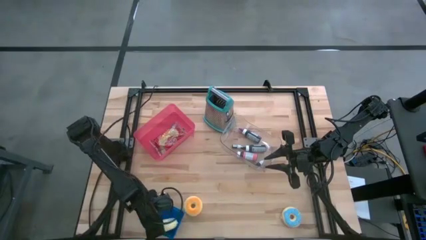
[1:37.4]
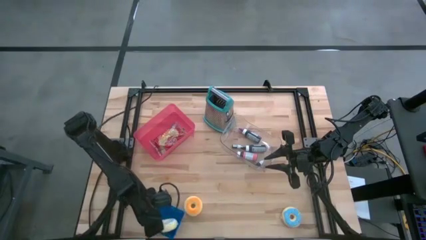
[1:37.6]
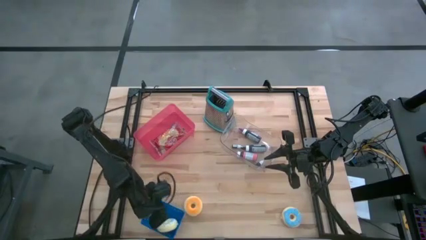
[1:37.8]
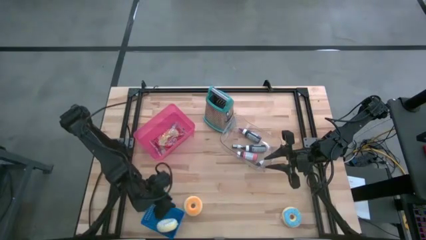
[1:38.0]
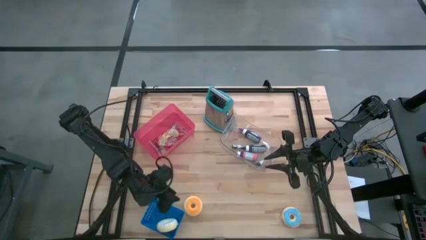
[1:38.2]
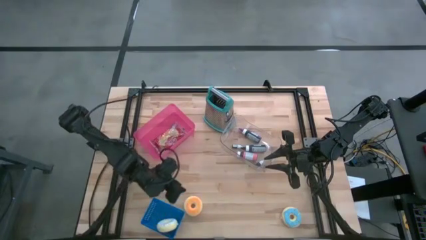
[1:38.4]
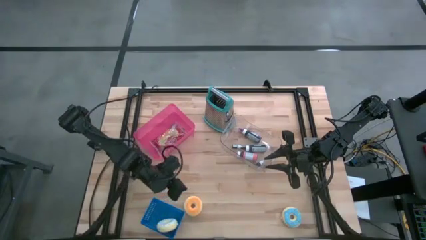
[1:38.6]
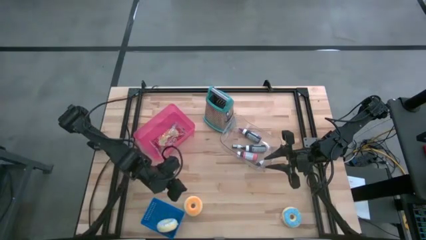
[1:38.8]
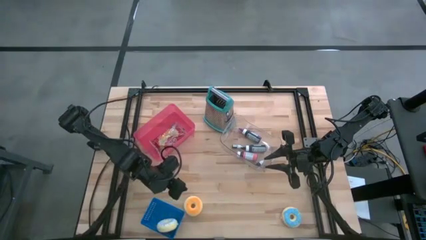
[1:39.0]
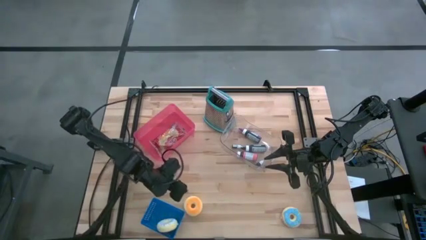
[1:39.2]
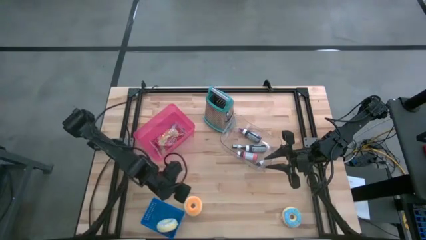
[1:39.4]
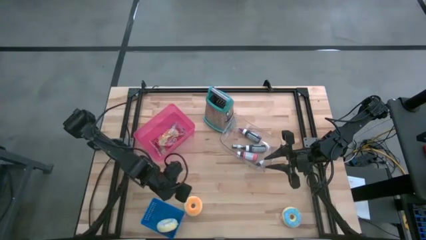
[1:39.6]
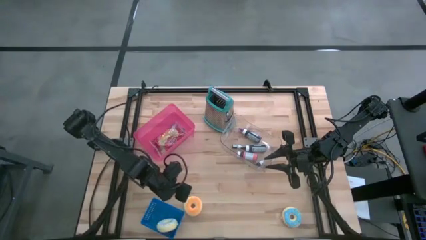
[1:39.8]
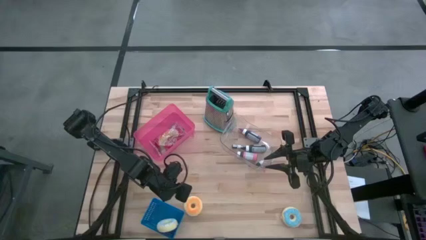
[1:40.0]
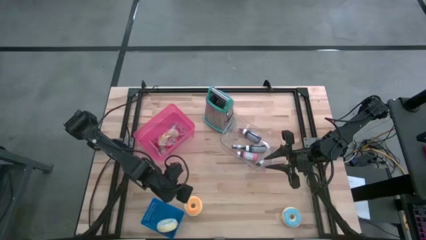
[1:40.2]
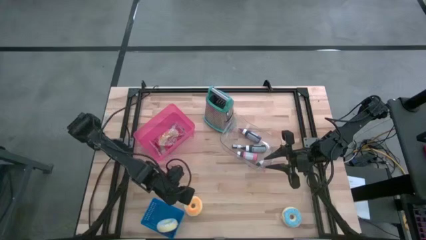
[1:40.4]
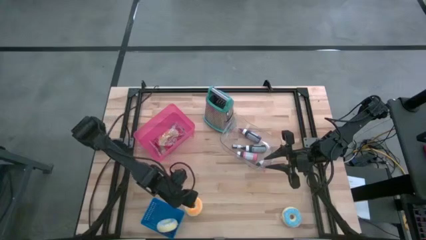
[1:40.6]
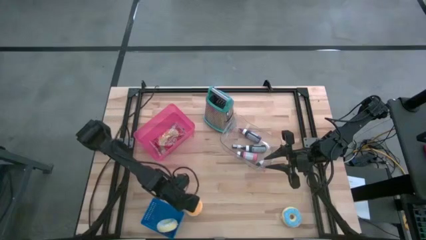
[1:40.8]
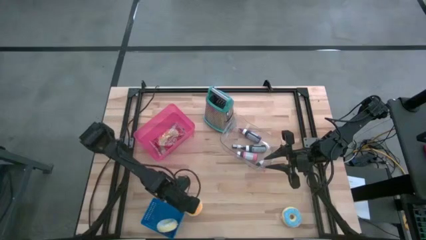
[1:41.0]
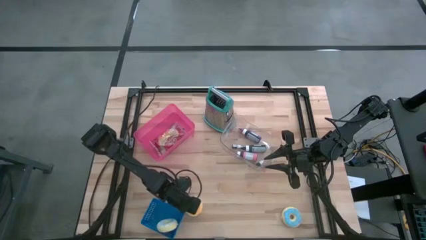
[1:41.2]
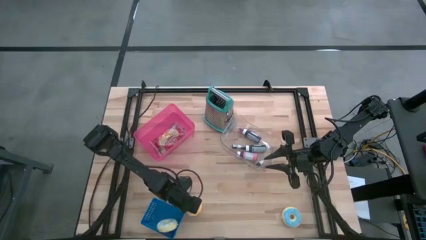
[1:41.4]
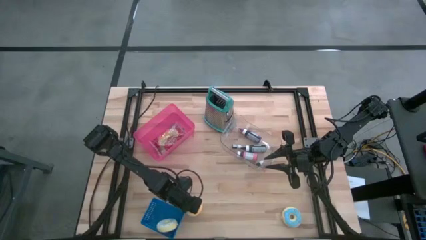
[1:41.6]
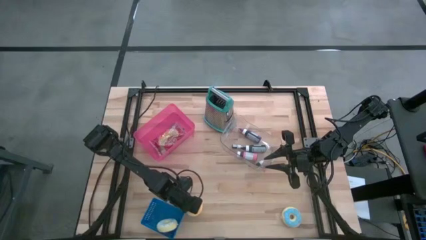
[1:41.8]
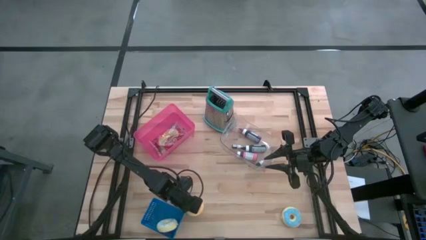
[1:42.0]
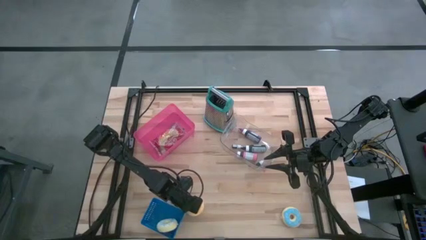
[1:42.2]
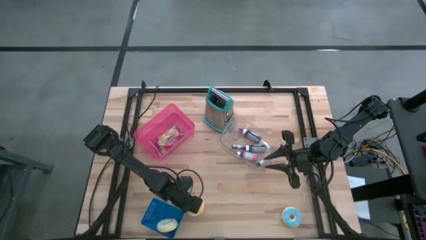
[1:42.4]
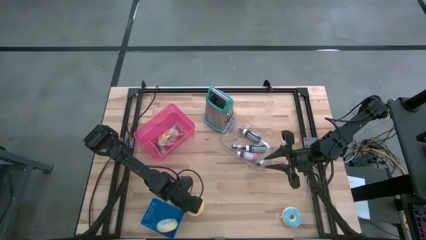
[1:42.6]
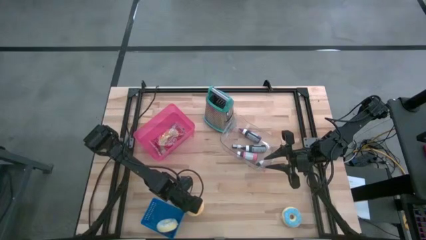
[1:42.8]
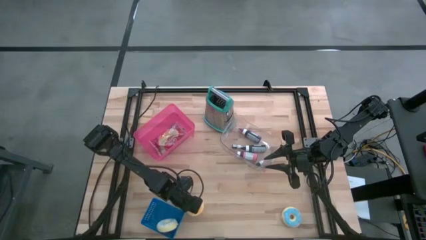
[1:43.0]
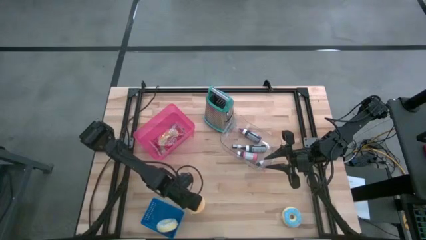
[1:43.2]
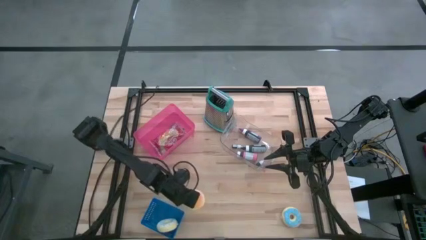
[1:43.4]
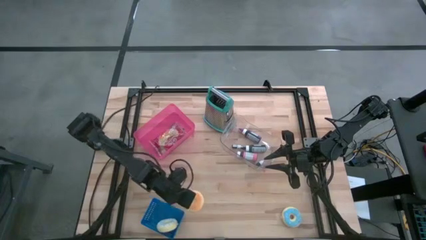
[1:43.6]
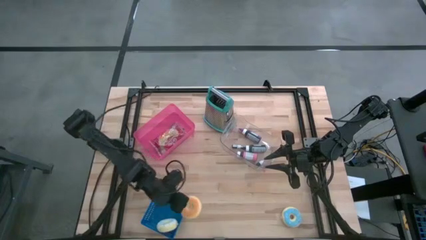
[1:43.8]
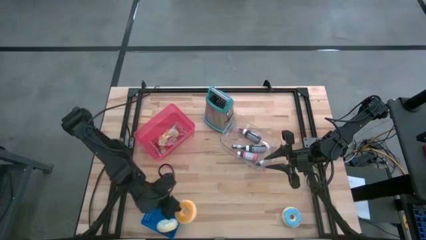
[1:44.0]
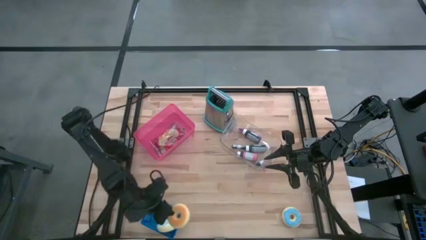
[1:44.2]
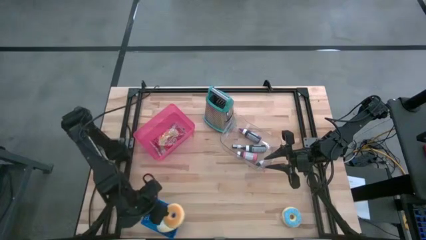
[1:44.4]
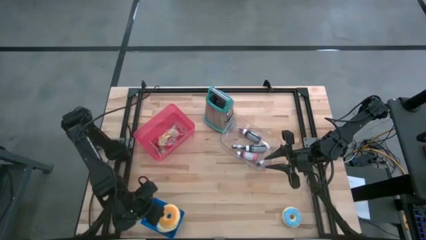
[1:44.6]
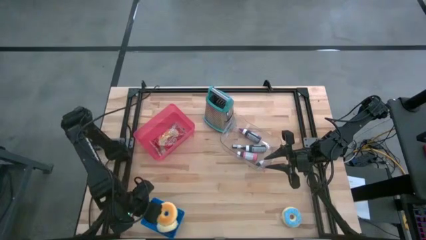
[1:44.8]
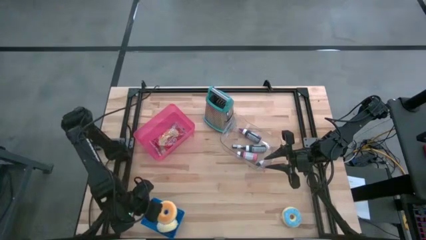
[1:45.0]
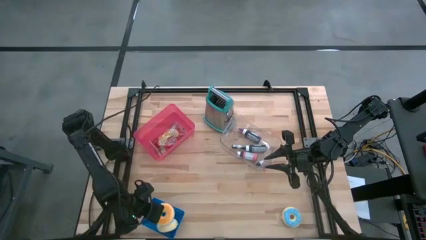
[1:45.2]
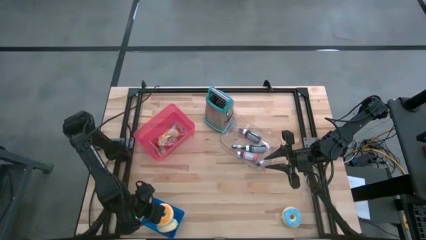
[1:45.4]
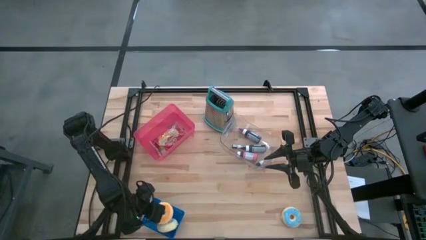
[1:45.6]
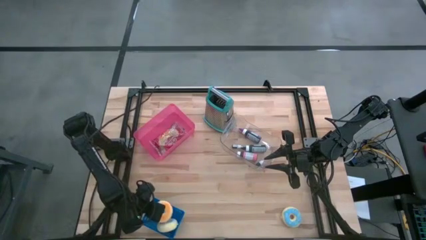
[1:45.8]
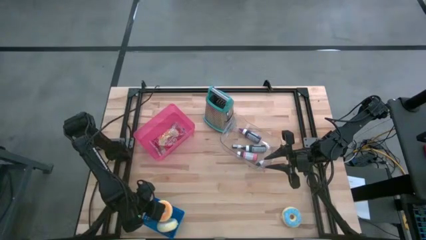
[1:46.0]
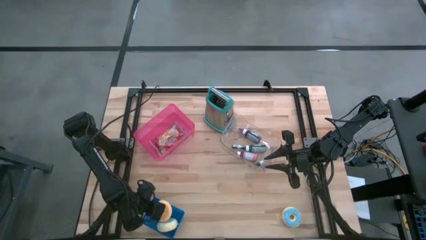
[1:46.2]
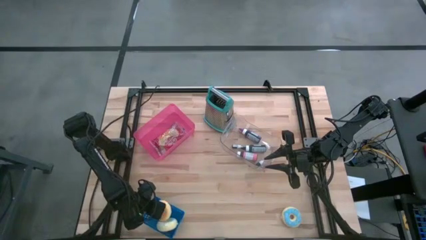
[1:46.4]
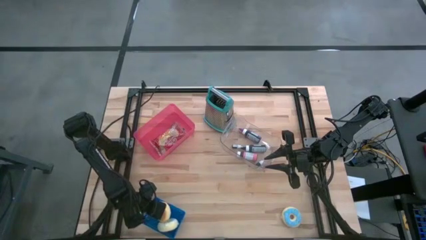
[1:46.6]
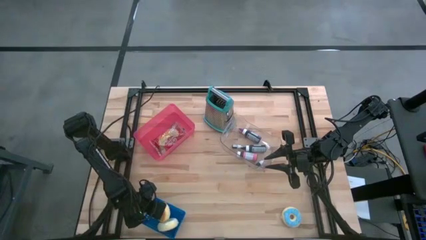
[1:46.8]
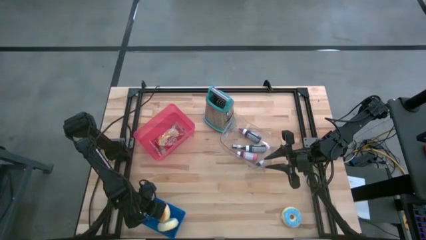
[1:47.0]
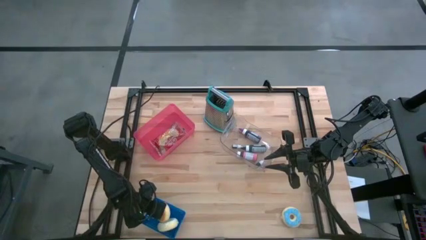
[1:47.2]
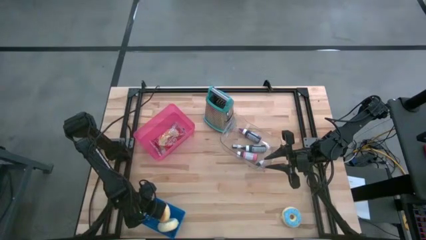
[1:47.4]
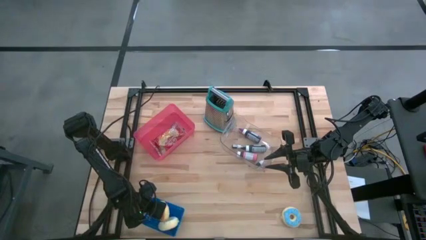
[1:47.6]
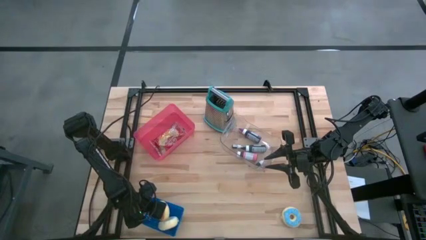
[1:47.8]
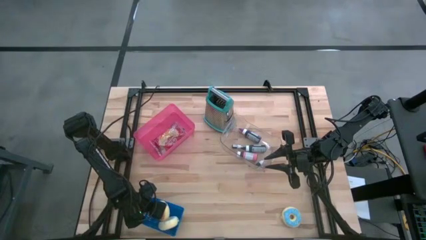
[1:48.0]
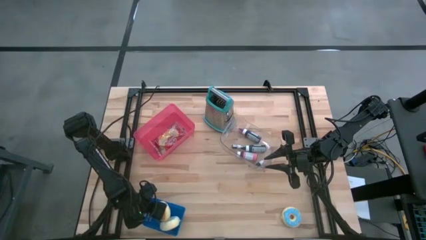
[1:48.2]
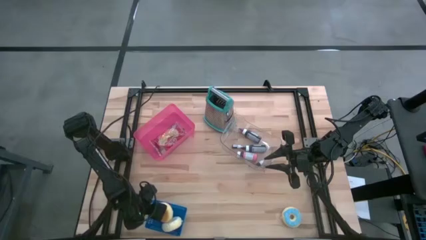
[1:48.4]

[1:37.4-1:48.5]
Task: Pick & Place Food Item
Put the orange donut into the blue bin

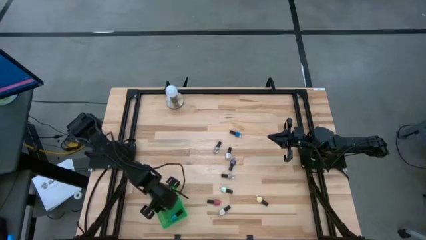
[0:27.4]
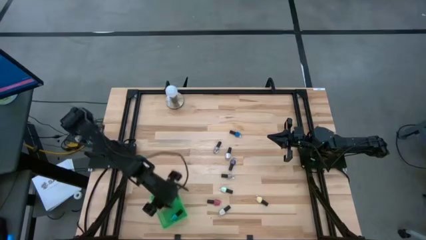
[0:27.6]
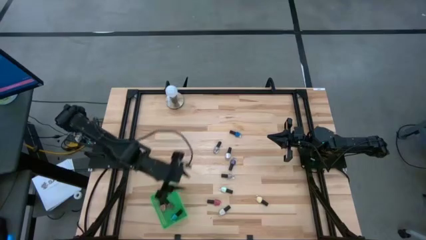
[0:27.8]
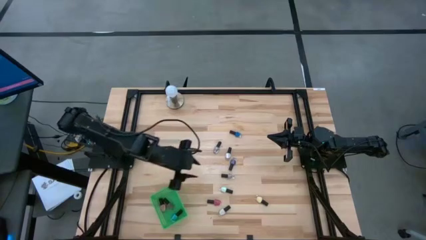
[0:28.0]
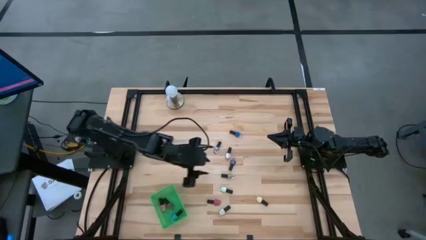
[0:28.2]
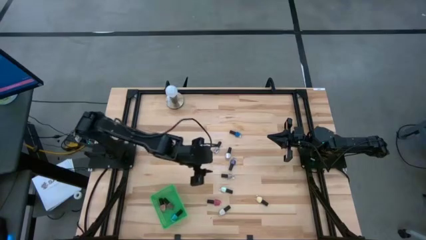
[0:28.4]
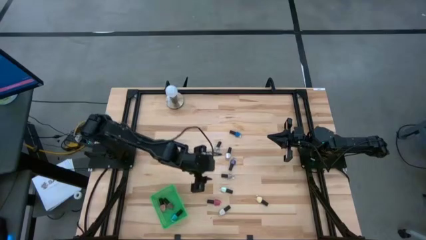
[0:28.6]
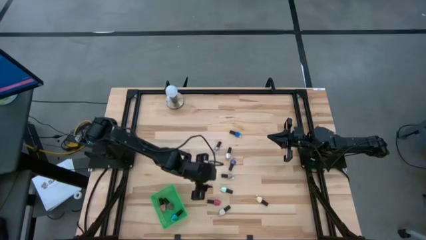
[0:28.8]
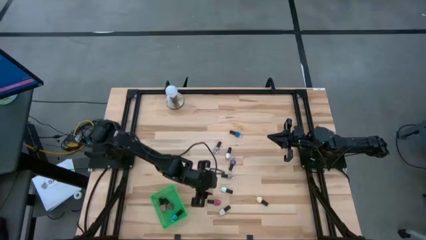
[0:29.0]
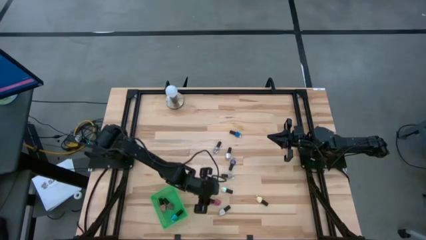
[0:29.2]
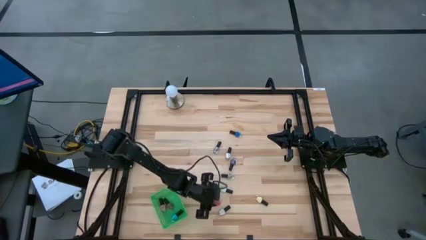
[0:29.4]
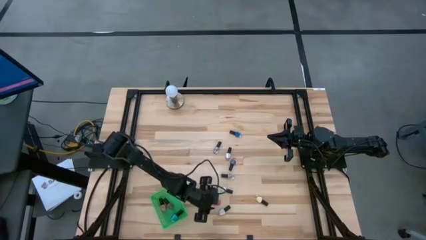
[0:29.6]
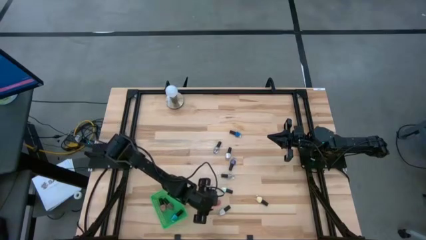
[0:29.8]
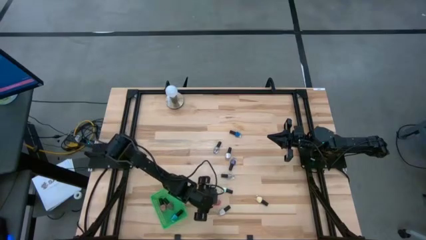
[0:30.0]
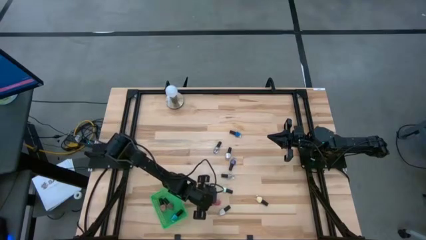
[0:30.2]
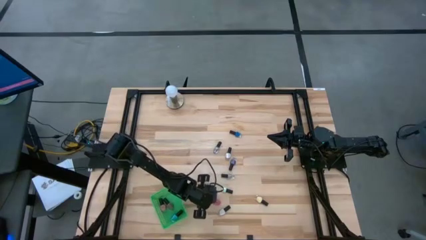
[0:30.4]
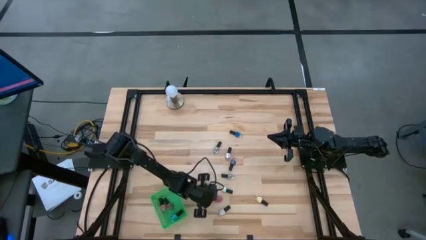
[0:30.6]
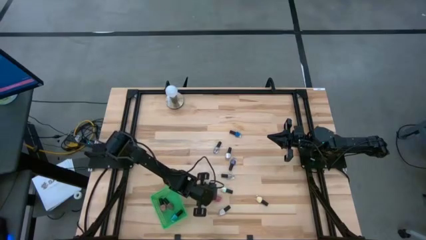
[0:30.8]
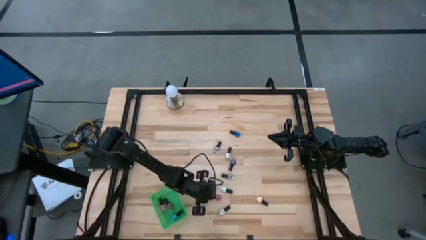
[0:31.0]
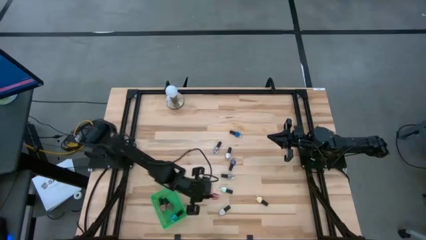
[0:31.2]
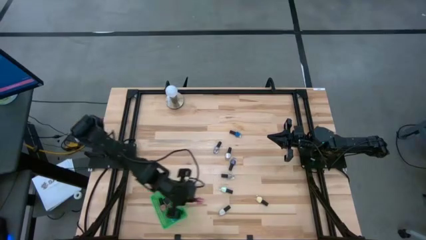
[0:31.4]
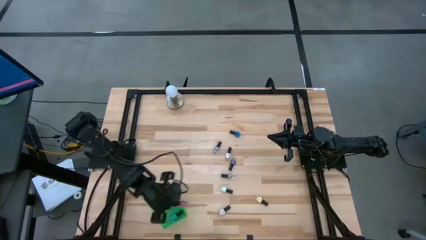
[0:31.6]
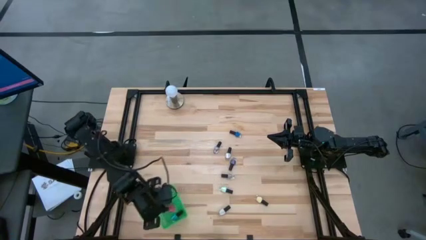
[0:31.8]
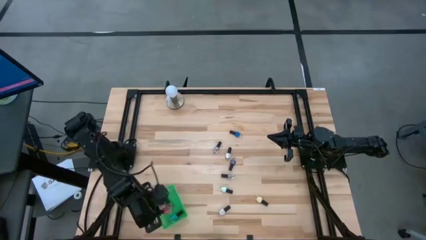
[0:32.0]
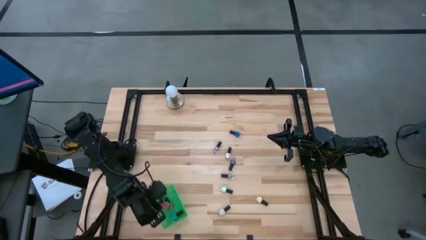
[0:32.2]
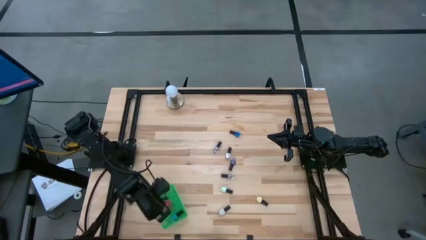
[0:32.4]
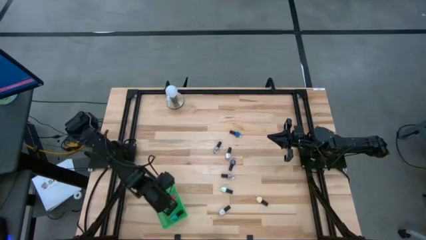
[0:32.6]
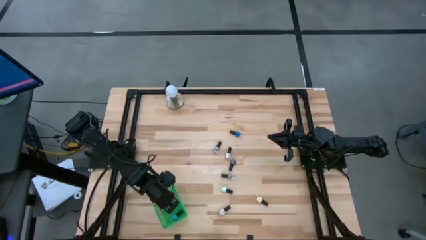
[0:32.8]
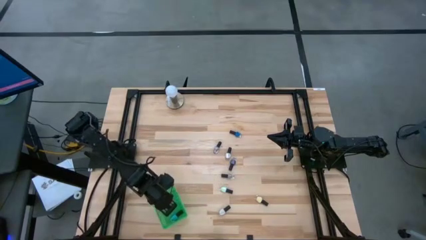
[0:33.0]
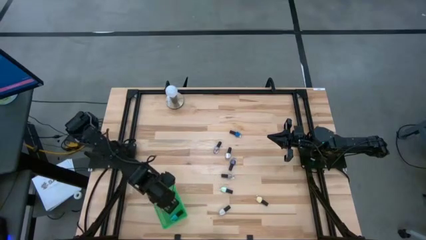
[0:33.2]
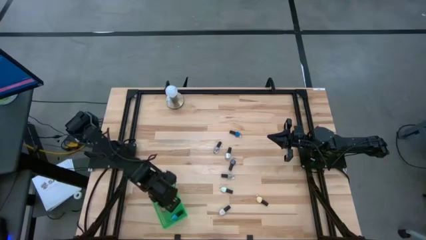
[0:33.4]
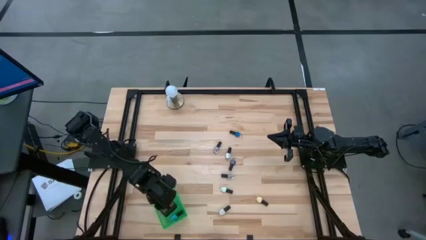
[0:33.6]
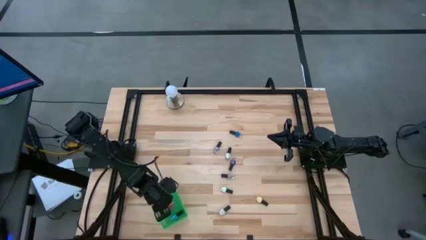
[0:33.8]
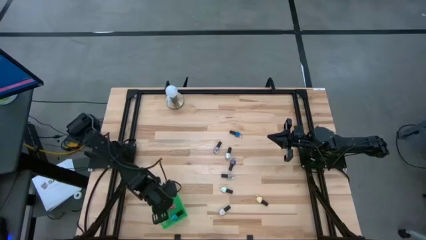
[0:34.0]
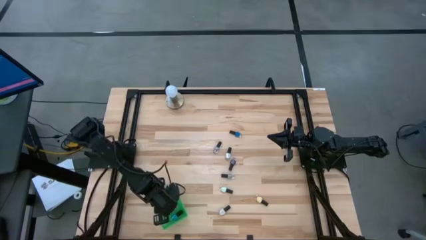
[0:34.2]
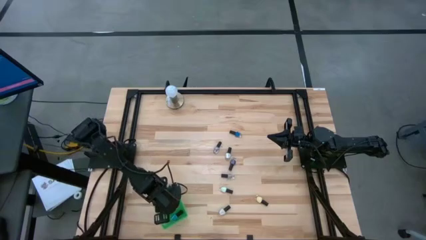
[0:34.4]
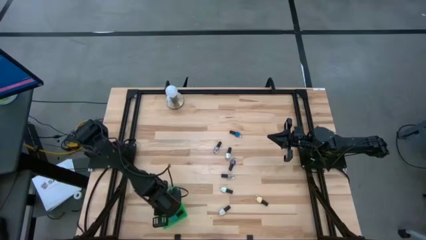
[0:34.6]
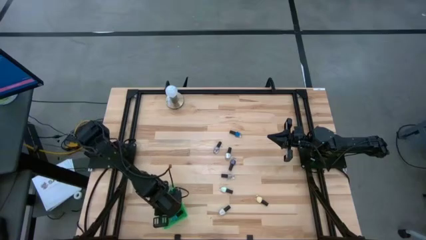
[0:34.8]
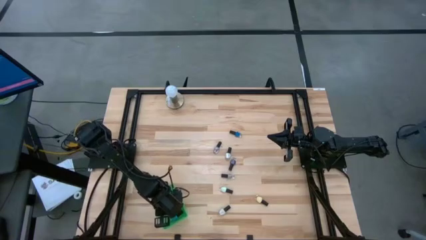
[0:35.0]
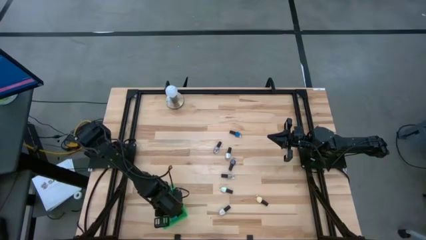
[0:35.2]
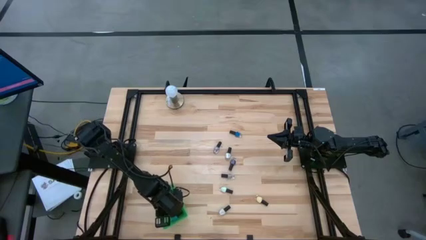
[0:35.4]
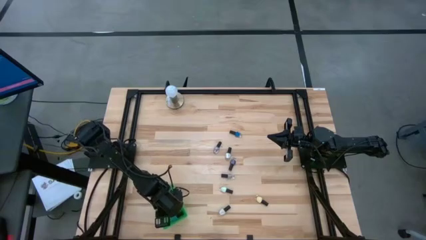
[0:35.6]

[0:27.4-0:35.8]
Task: Pick & Place Nail Polish
Put the black red nail polish bottle into the green basket
